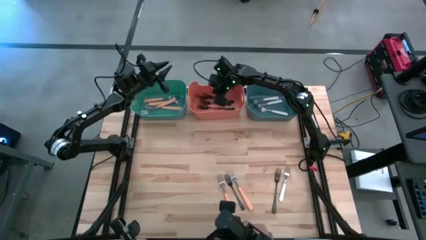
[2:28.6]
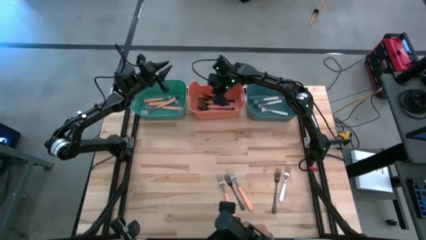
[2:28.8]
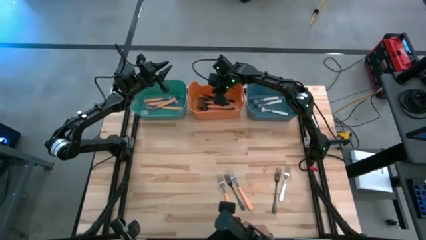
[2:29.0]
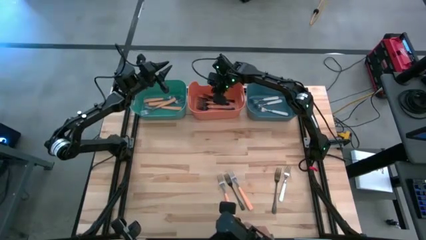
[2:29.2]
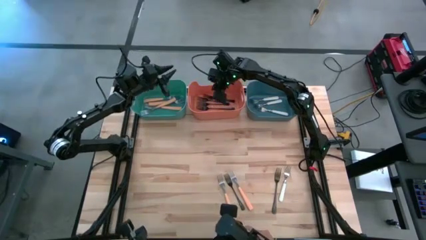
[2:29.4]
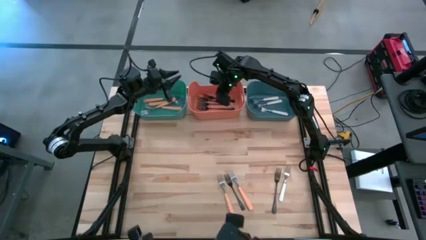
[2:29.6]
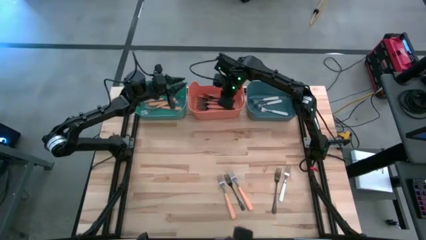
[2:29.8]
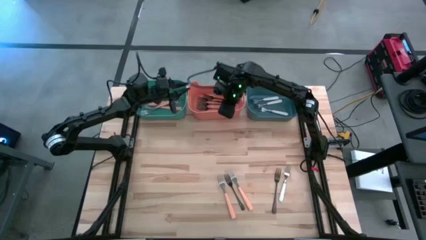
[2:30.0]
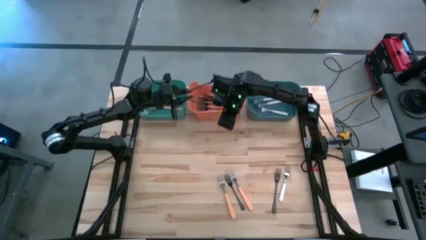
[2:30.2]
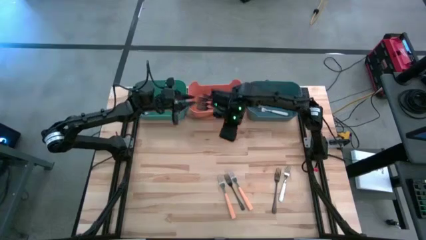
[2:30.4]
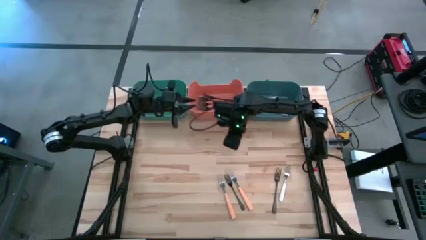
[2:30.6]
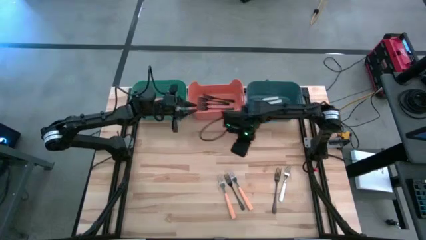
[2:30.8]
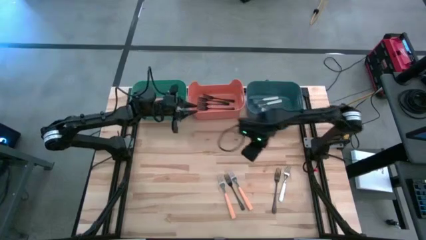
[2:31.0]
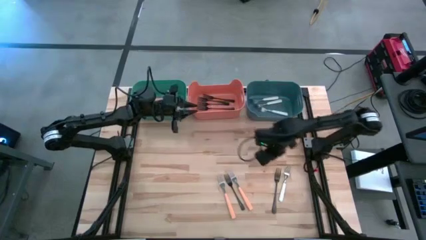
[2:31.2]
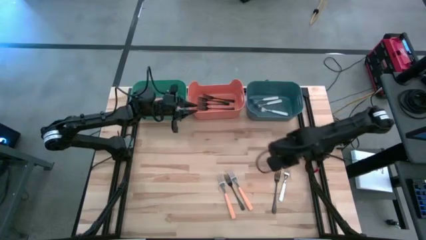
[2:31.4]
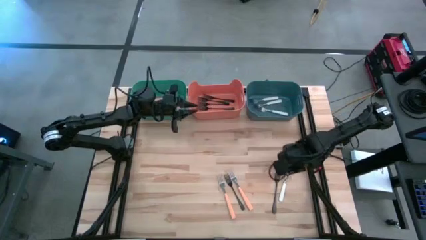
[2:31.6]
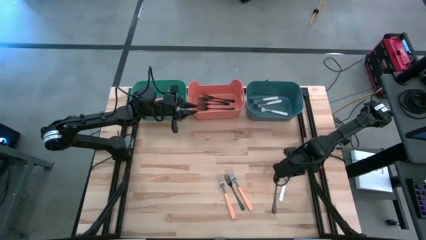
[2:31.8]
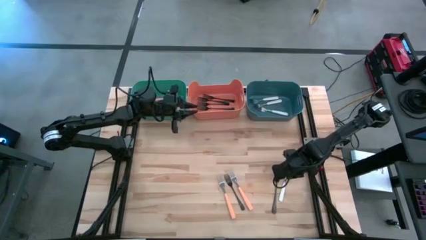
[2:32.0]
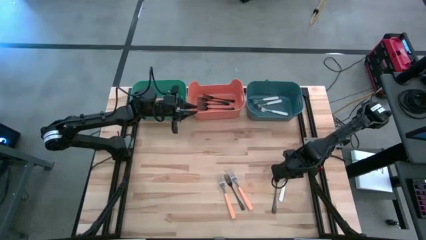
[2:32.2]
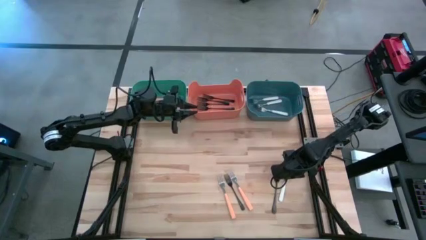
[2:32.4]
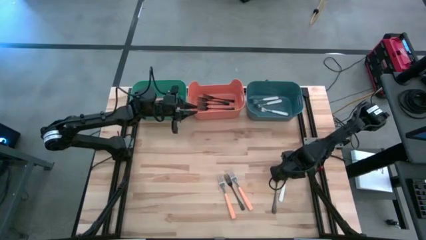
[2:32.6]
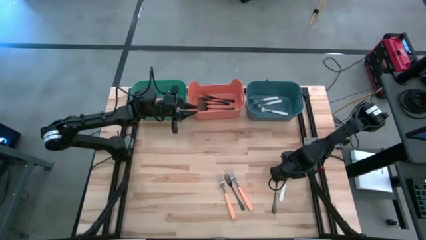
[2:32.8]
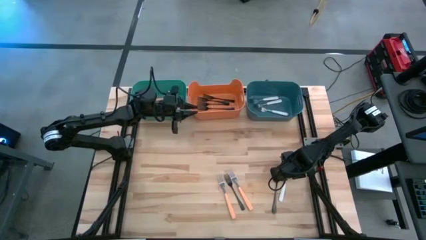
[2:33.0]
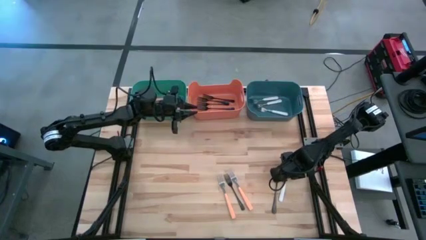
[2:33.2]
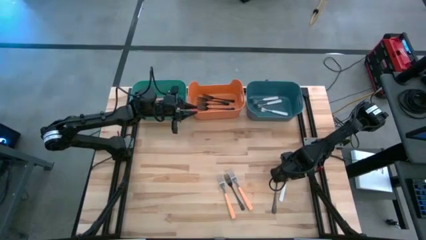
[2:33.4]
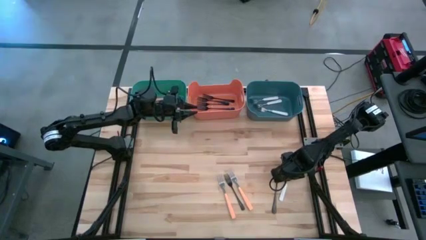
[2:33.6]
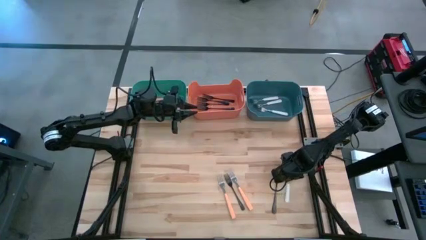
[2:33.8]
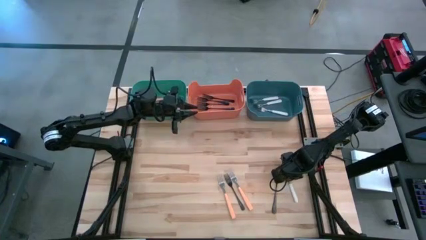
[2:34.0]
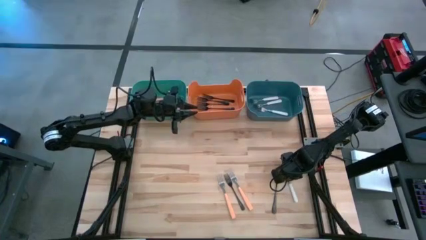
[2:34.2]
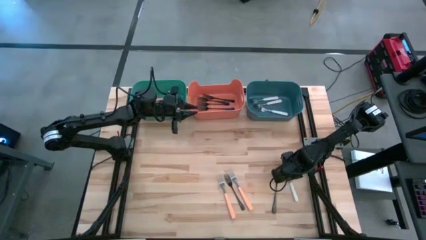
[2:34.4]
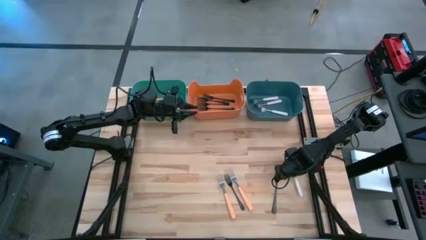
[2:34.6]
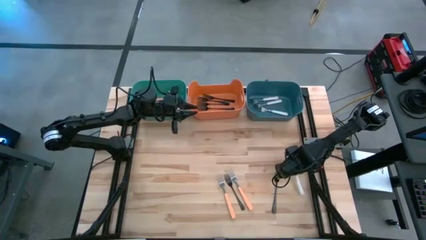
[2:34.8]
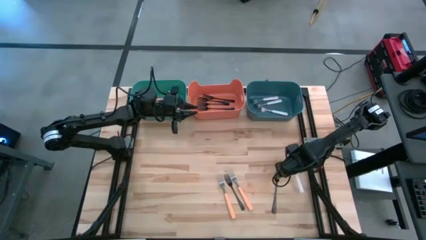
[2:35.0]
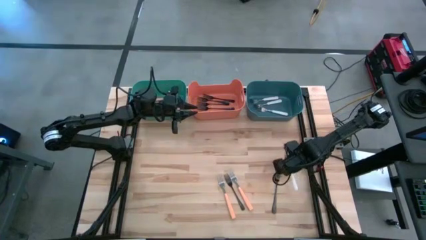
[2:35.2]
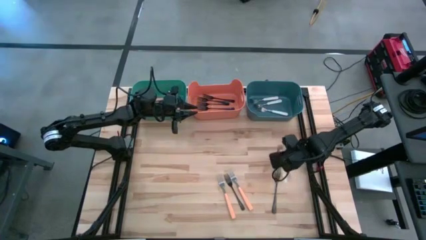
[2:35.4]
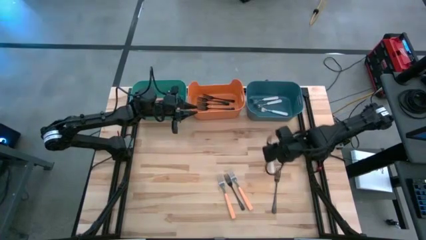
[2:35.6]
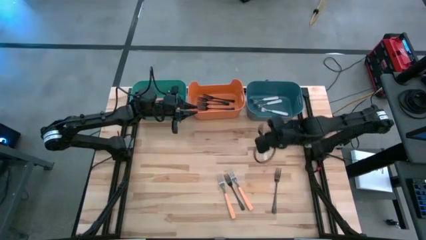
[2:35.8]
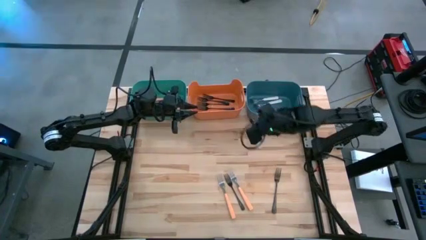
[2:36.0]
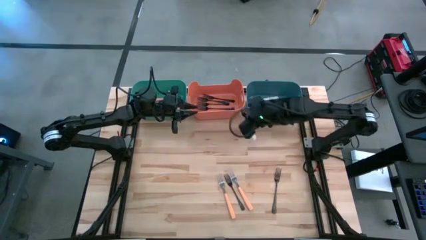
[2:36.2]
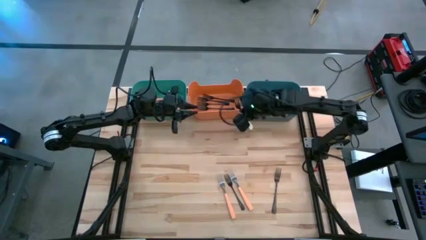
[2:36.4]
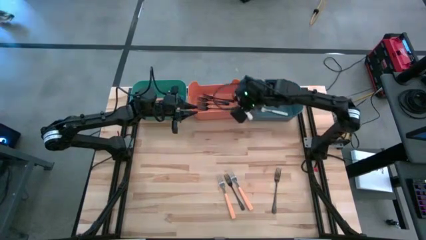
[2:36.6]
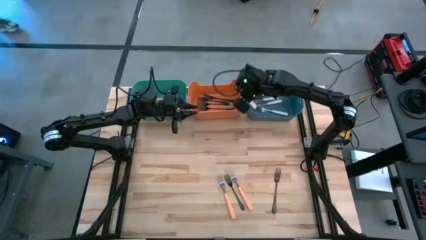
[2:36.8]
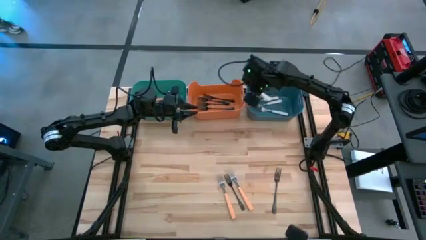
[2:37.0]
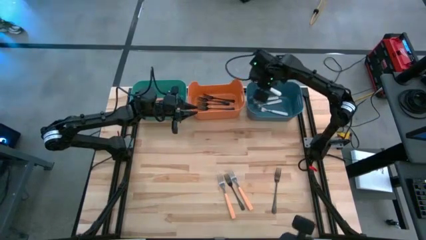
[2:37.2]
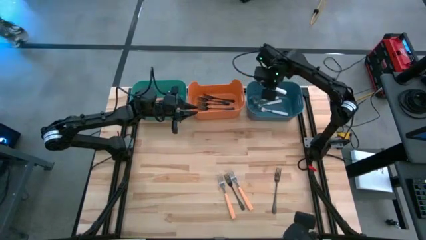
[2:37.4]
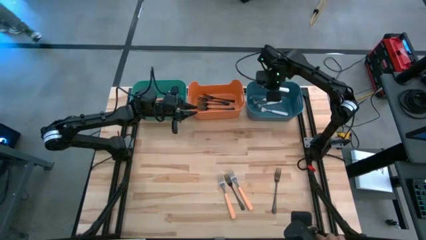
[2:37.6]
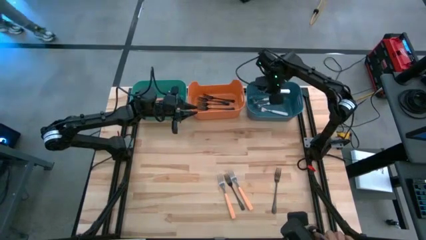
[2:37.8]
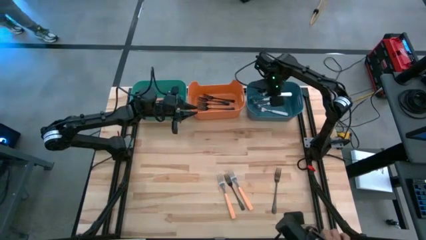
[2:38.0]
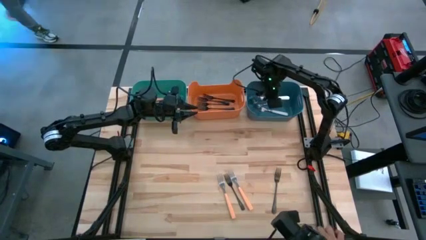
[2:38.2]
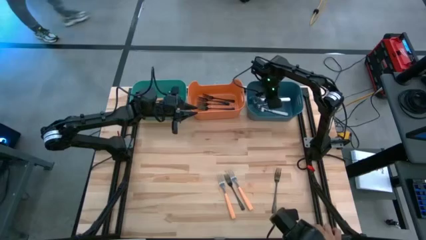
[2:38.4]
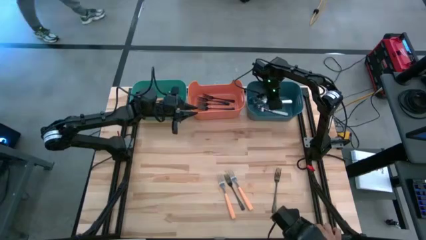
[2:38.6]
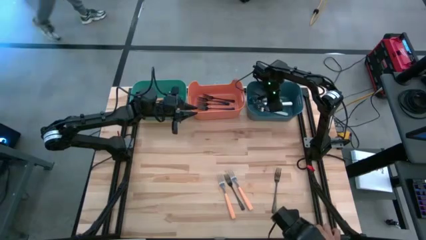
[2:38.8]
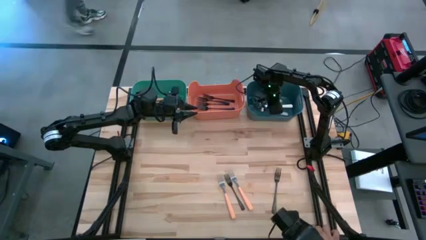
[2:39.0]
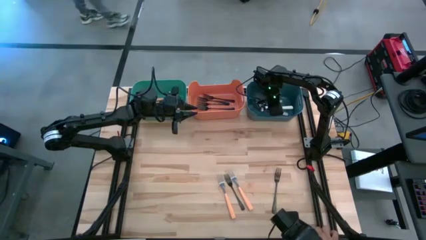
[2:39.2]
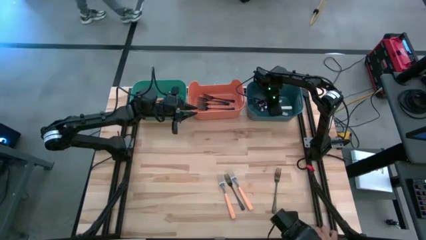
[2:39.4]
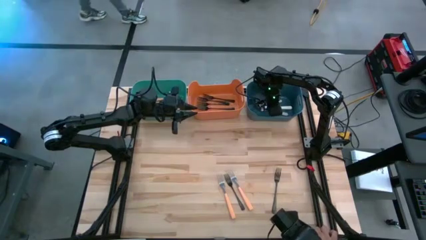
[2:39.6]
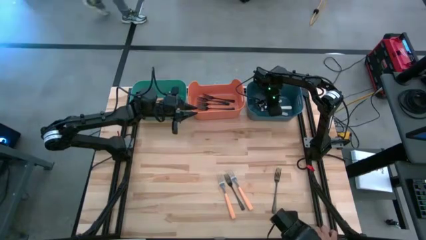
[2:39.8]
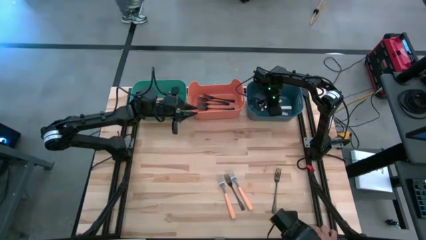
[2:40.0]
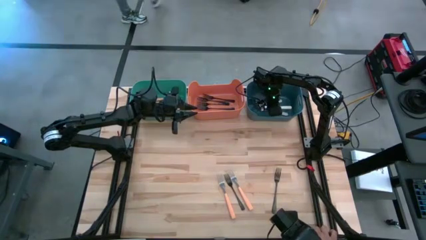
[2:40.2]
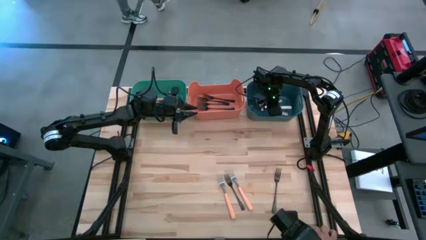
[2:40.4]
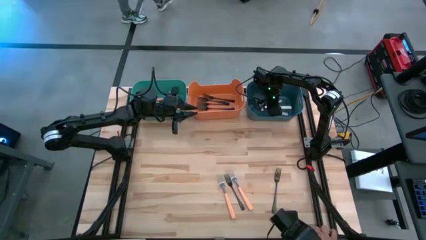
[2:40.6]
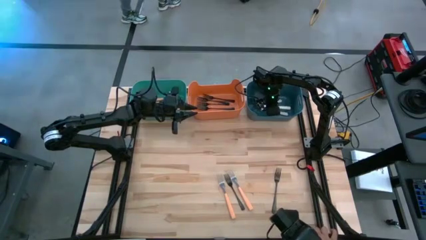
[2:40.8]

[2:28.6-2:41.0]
Task: Sort silverware by color (type)
Put the white fork into the blue bin

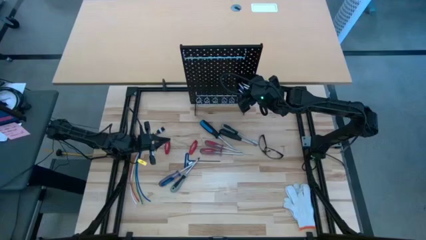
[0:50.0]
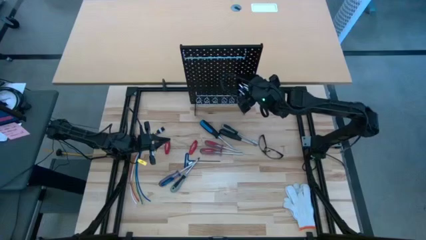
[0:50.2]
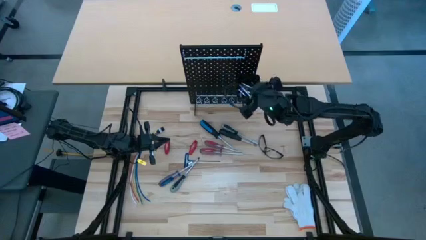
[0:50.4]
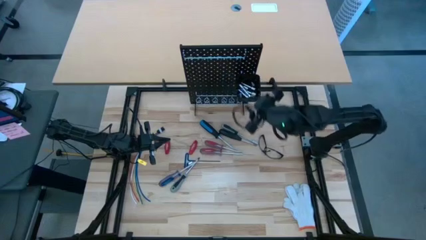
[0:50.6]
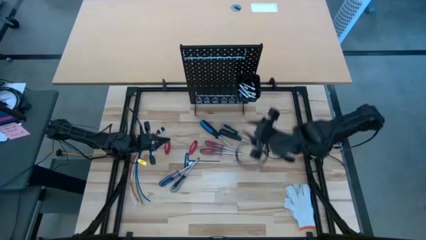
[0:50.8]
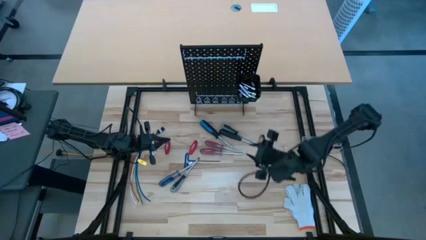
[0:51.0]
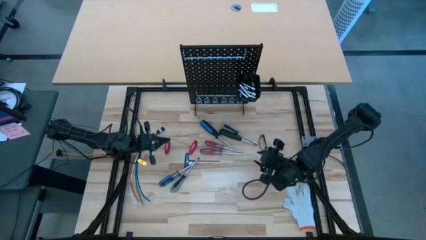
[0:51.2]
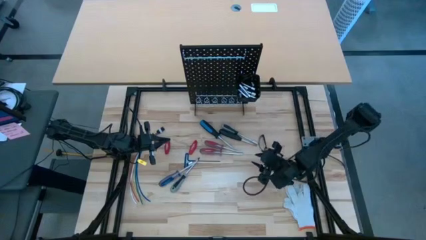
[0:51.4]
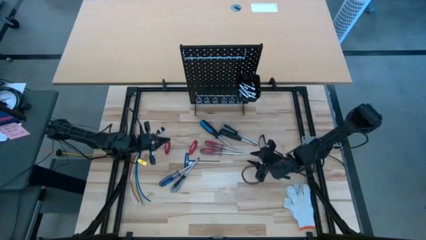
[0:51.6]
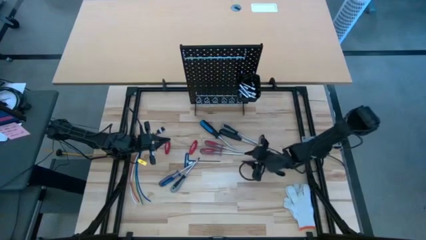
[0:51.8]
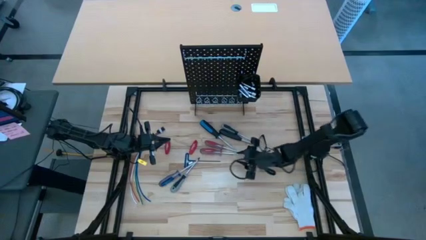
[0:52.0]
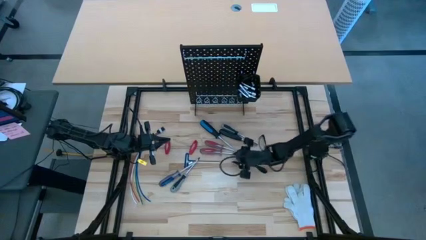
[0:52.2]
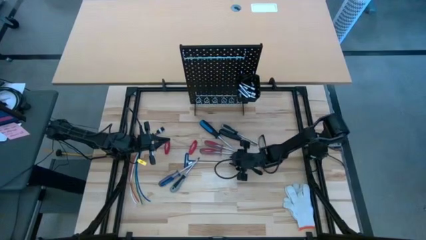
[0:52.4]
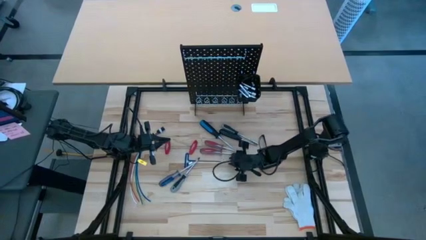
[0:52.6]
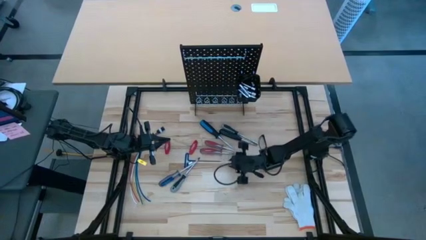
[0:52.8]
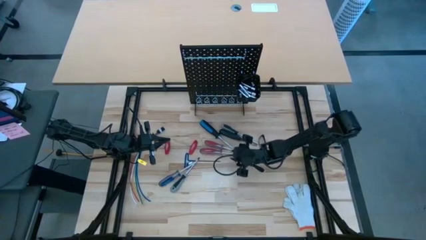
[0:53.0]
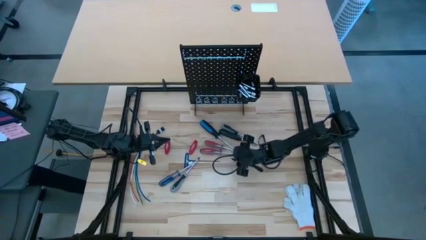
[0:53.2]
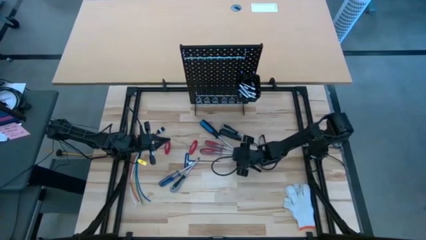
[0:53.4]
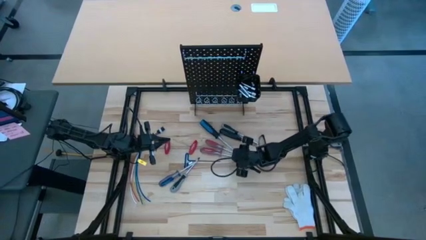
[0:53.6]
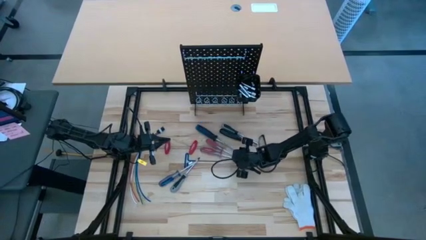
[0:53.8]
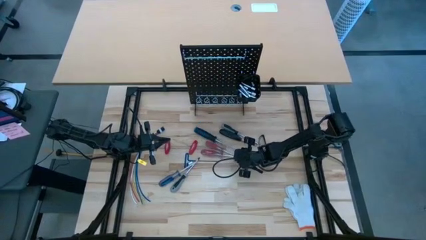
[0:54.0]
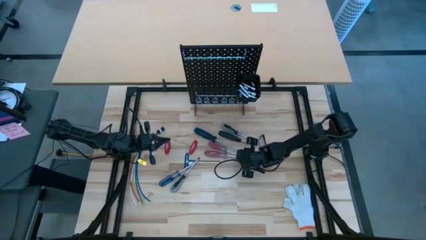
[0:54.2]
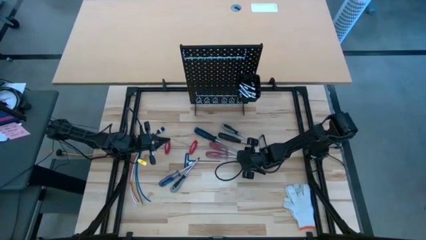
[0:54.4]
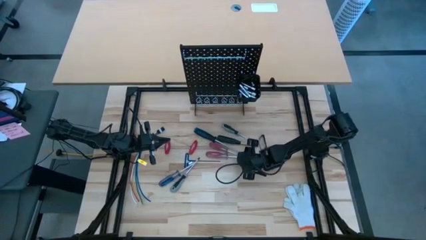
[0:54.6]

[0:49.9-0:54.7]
Task: Hang tools onto peg board
Hang the red screwdriver on the pegboard
